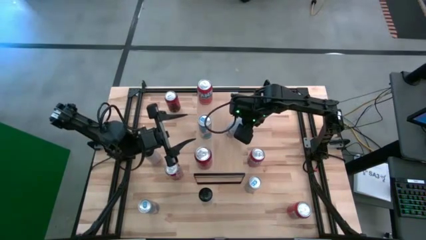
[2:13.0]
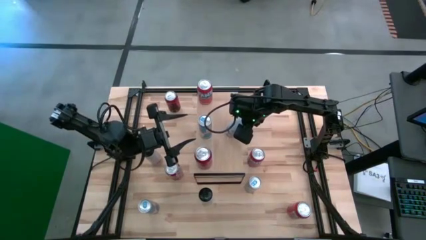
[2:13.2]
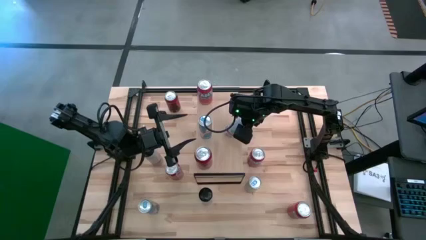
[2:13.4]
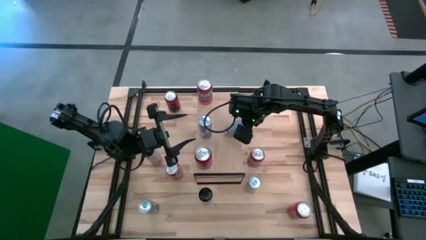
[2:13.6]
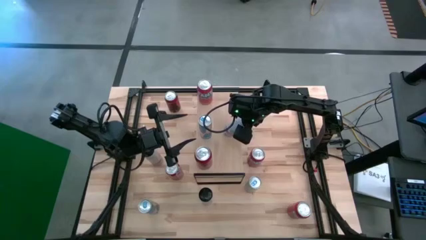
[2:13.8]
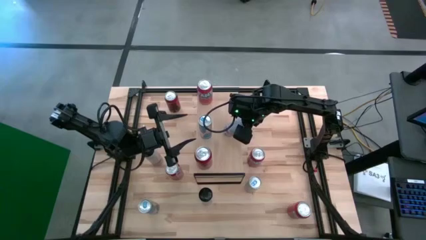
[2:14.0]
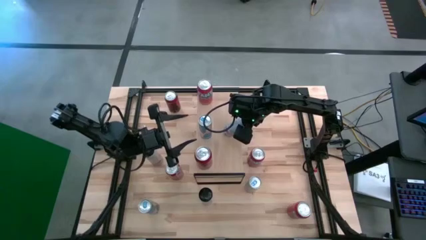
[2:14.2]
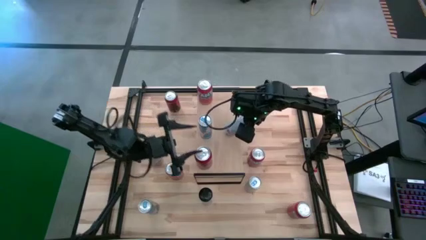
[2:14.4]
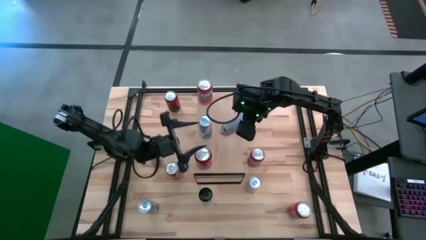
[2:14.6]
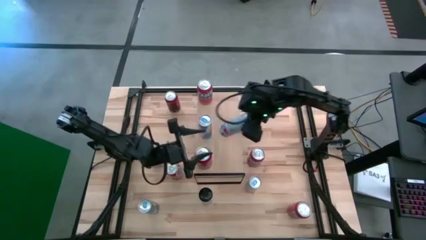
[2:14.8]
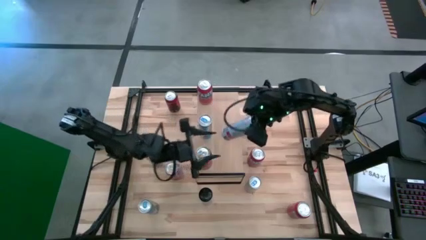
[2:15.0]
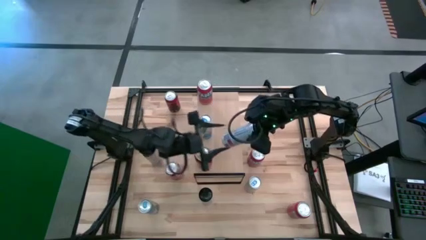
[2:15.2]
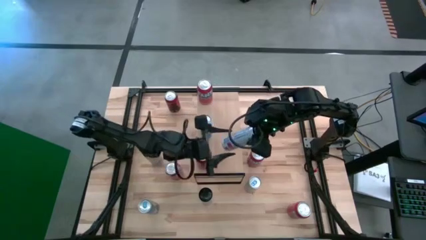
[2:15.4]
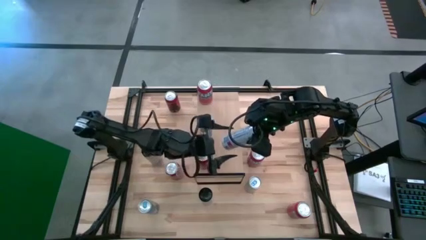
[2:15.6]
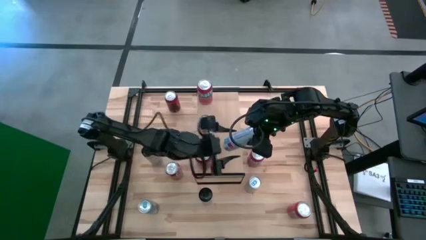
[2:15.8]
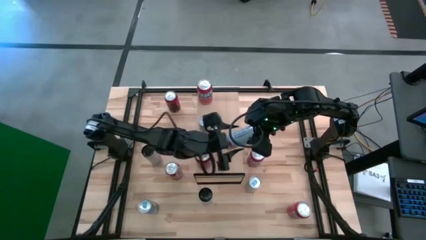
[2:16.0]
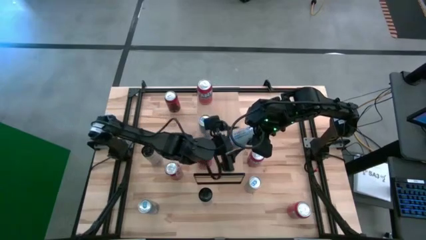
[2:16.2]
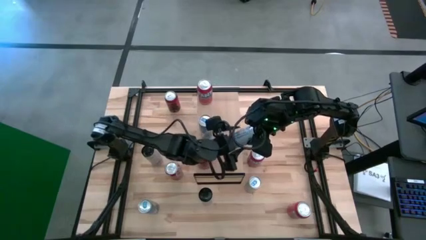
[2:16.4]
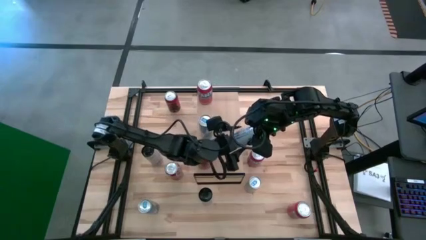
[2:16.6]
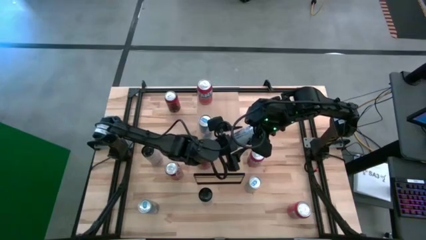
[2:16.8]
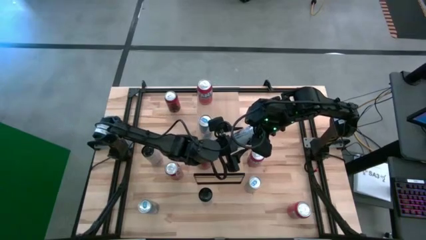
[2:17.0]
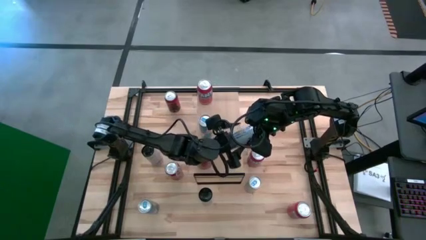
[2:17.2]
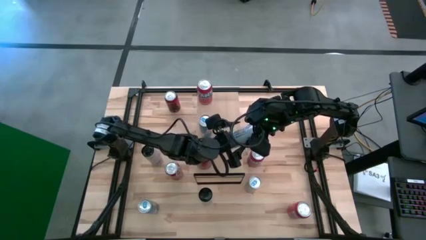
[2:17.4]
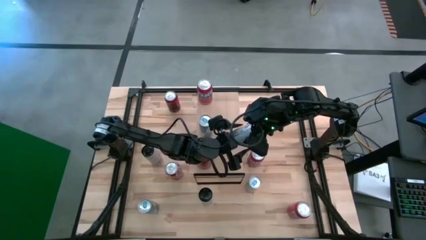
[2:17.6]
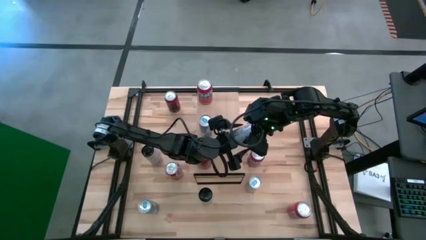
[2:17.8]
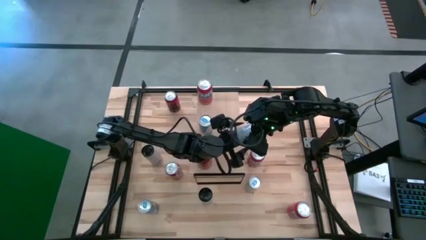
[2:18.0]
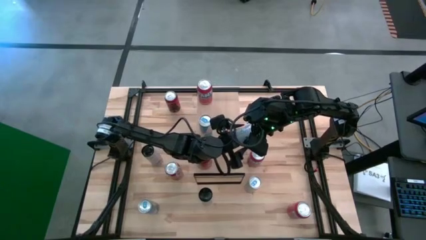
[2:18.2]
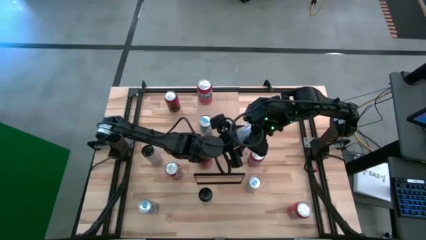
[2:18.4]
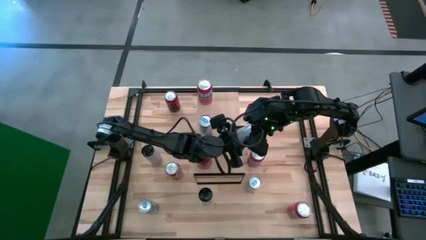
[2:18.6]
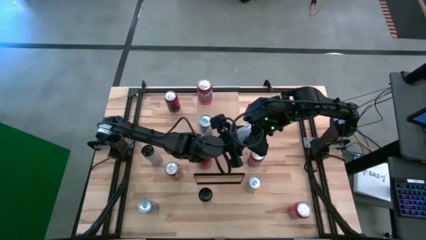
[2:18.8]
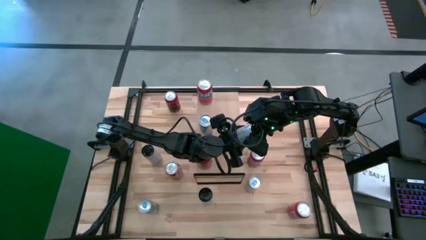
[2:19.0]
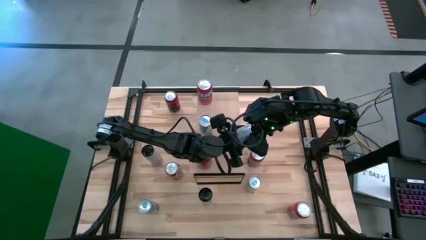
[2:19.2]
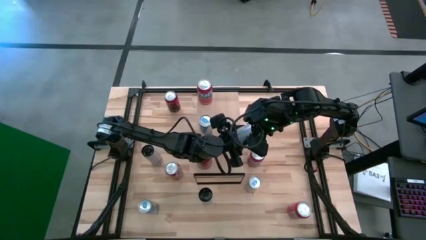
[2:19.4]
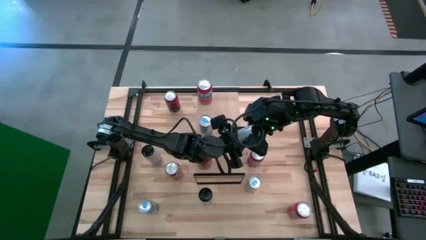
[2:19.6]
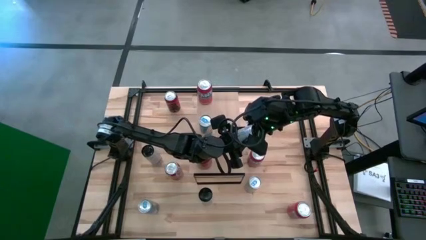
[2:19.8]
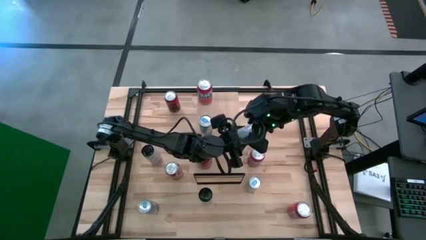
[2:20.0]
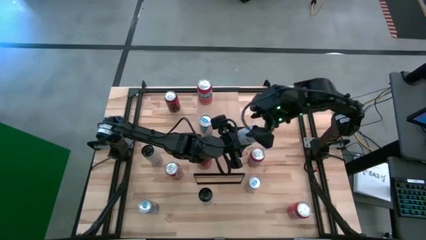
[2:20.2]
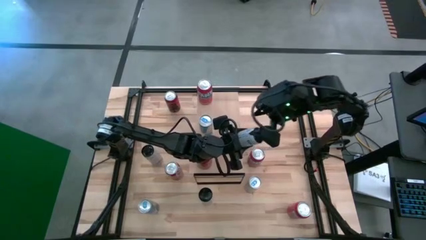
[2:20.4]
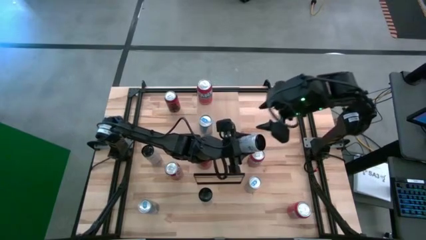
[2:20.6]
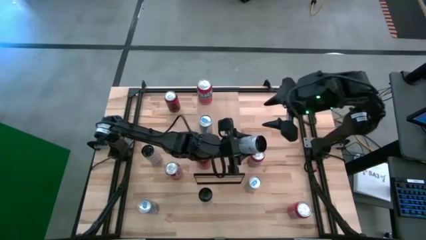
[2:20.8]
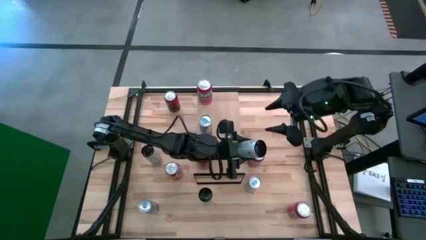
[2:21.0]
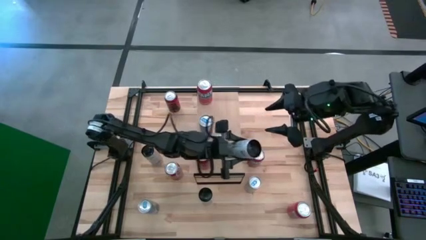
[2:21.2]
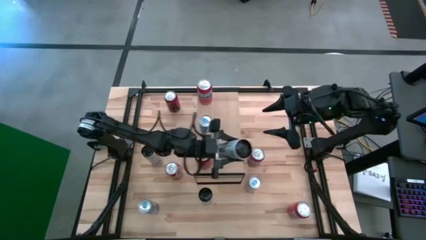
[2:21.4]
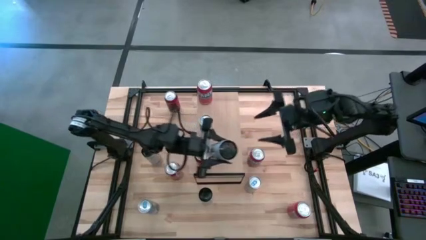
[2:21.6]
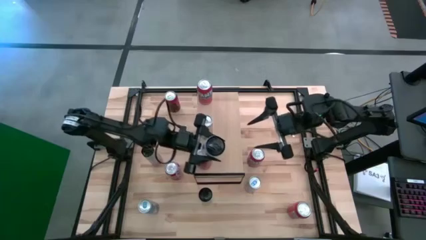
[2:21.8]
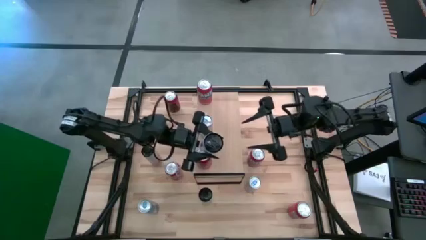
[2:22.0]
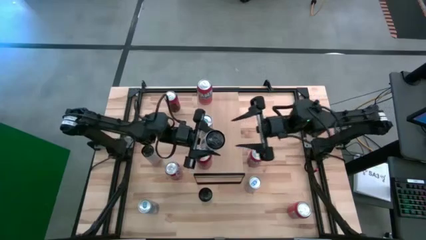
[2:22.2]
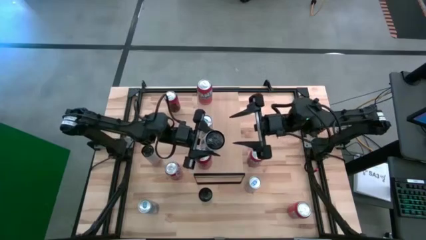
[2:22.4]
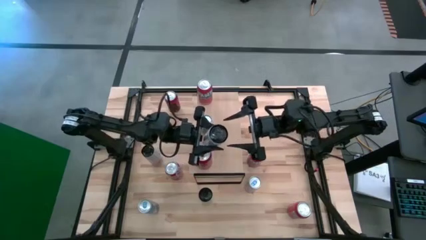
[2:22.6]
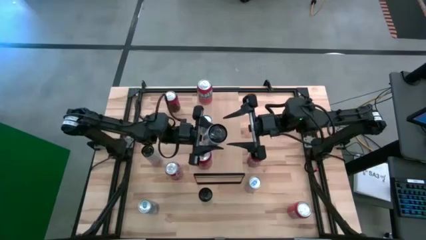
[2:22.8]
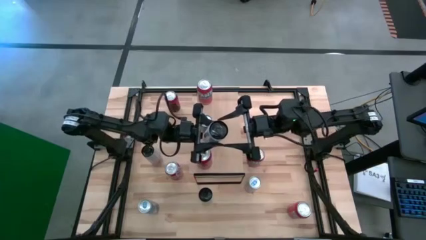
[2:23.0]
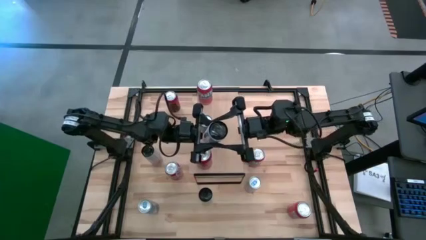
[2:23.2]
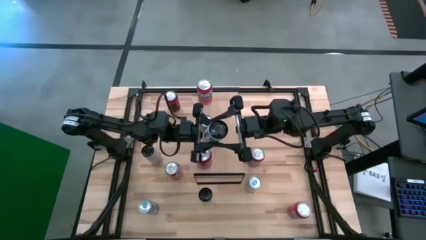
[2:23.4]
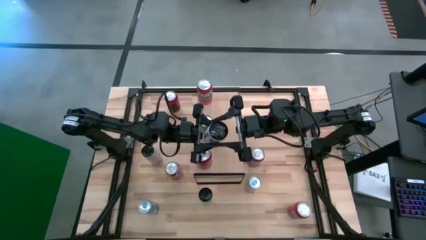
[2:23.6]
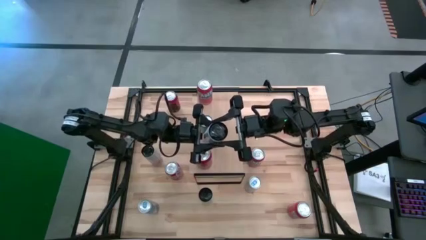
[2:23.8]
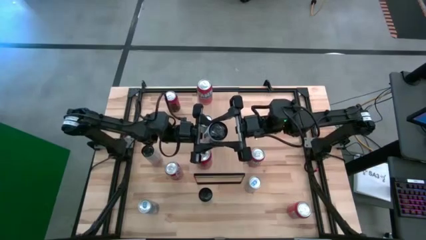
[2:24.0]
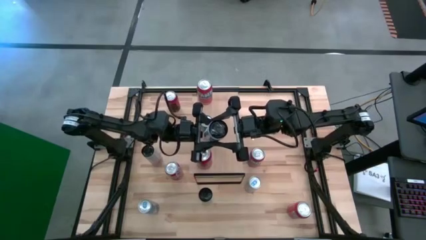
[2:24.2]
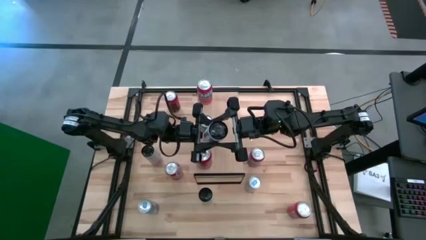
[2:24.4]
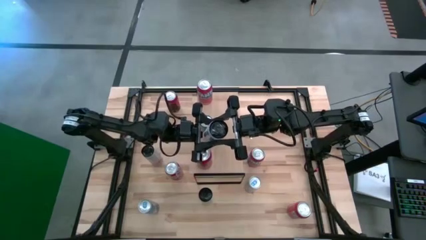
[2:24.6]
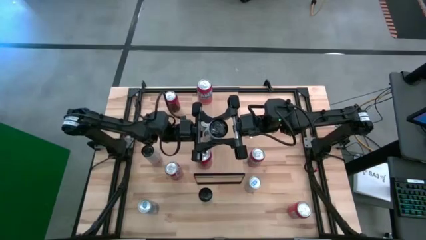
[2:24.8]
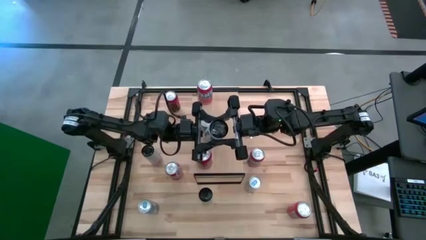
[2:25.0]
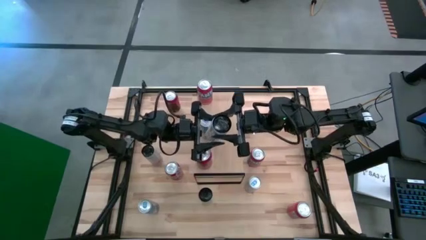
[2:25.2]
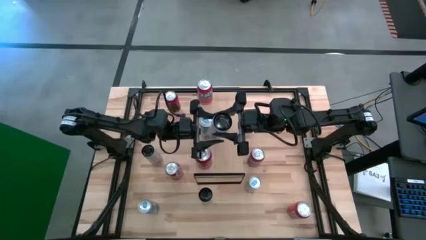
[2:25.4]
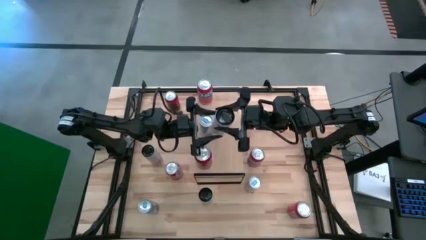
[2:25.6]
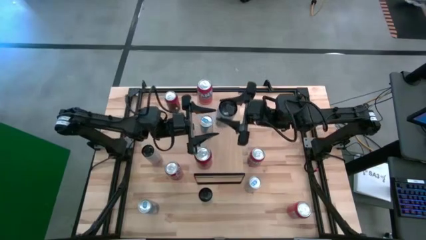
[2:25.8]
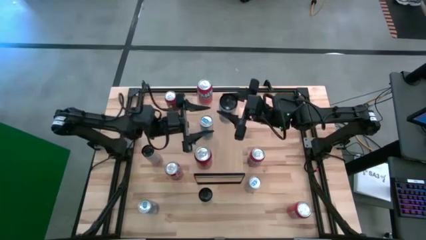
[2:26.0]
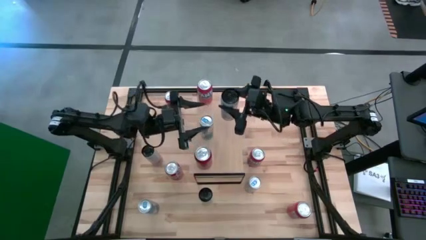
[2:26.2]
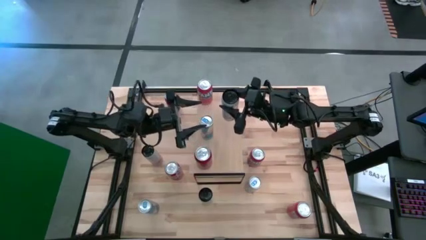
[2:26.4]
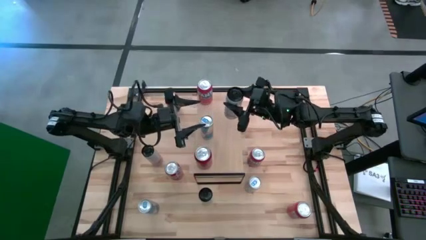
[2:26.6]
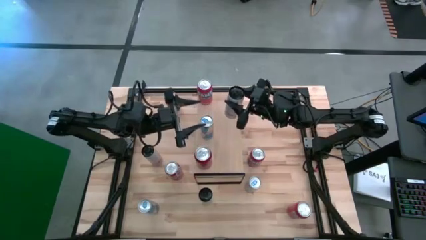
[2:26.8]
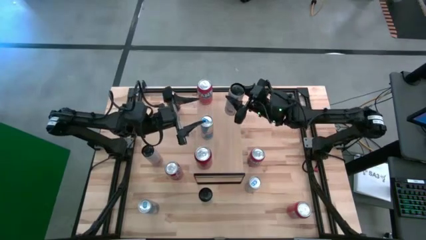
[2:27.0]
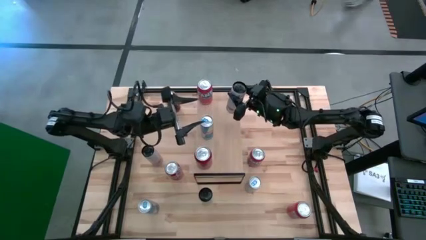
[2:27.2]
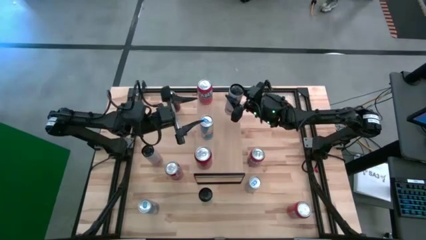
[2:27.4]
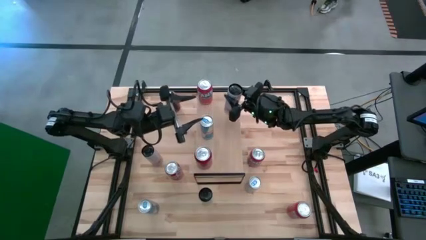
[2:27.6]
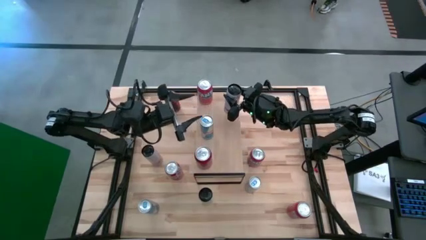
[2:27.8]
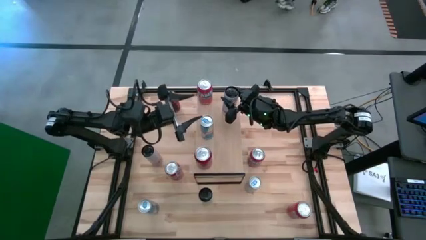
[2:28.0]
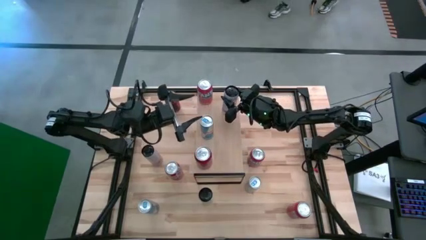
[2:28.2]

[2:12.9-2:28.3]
Task: Place canned beverage on shelf
Put the white and pink soda can on the top right shelf
